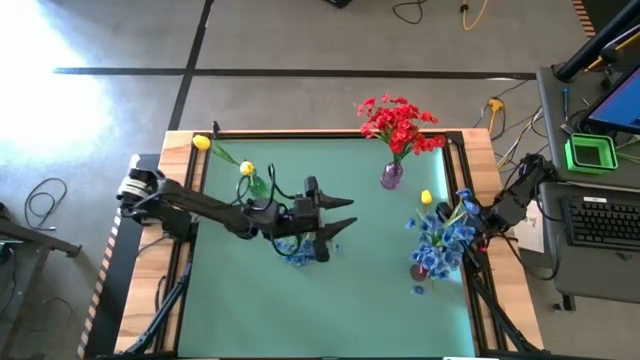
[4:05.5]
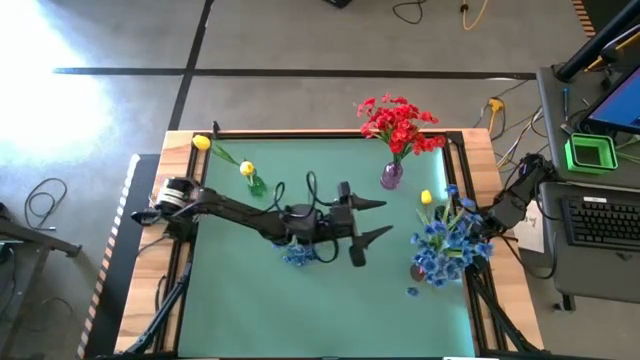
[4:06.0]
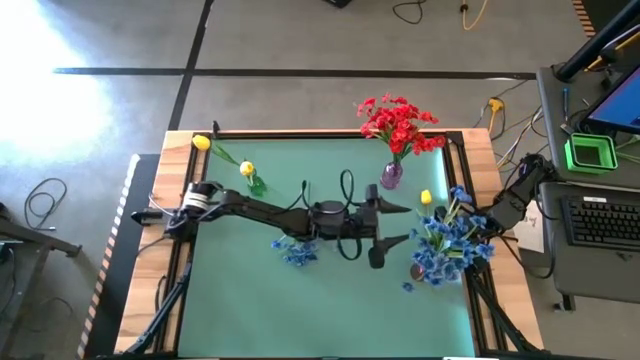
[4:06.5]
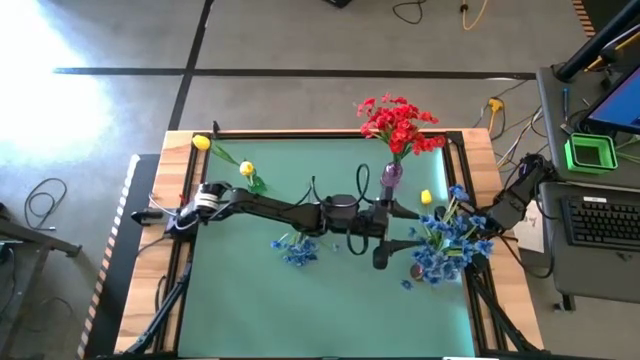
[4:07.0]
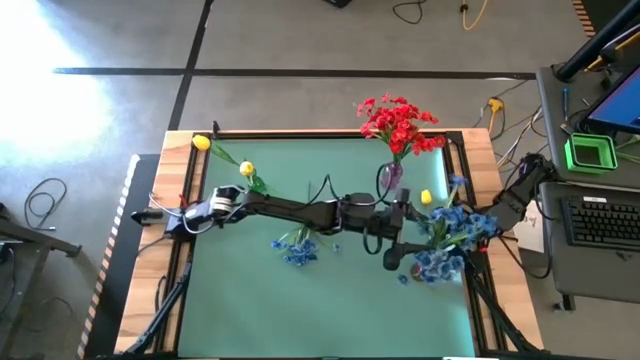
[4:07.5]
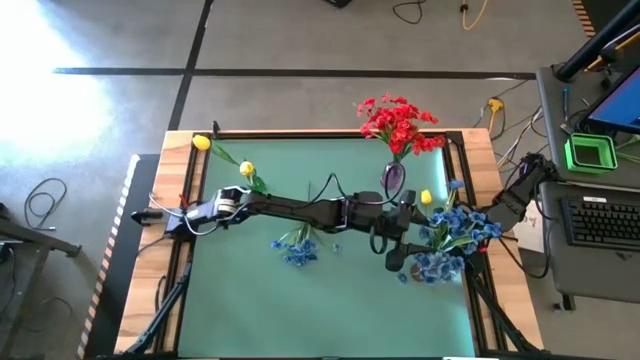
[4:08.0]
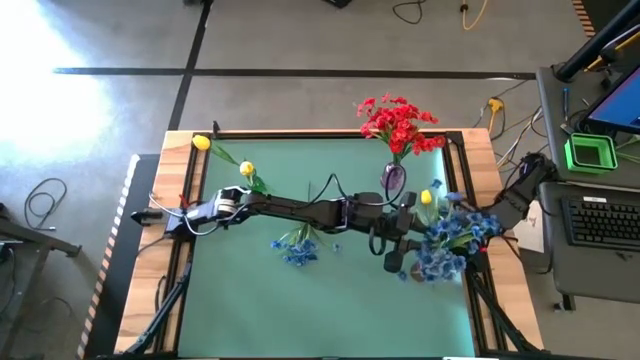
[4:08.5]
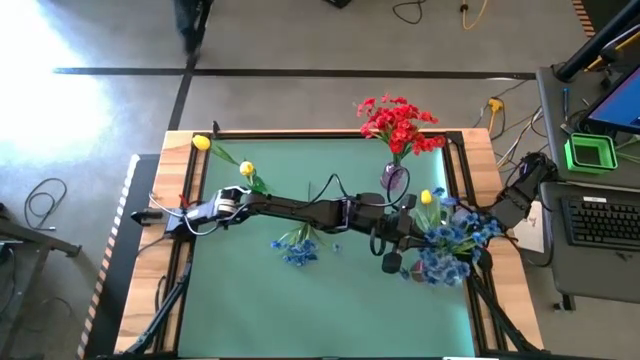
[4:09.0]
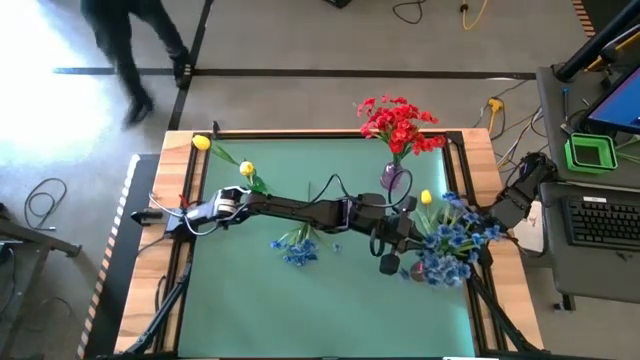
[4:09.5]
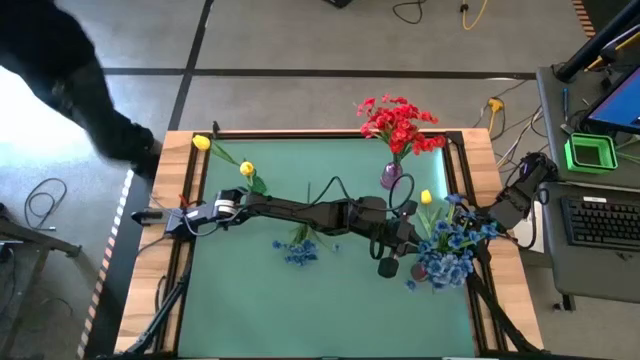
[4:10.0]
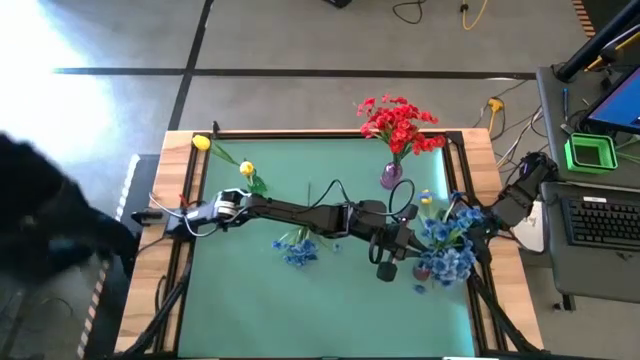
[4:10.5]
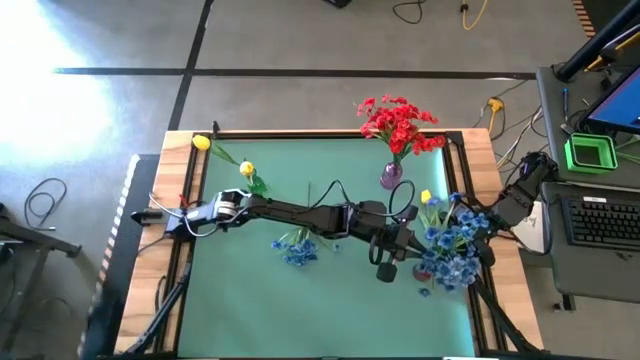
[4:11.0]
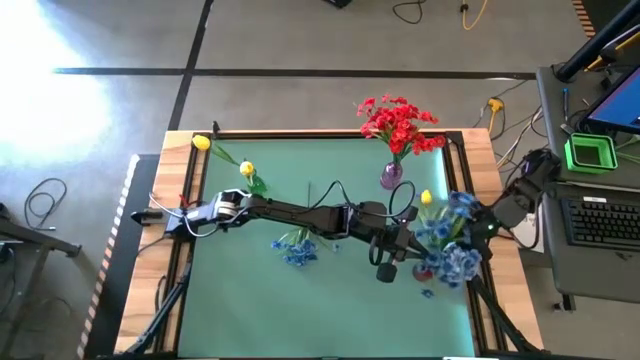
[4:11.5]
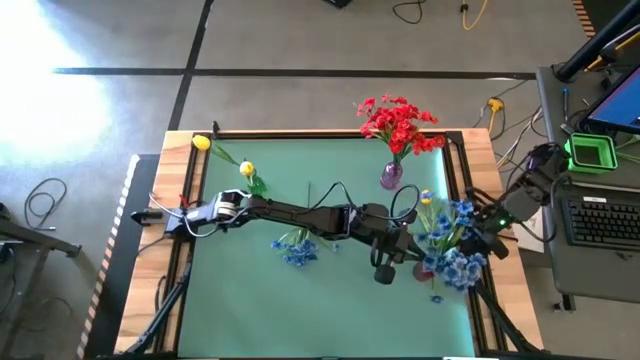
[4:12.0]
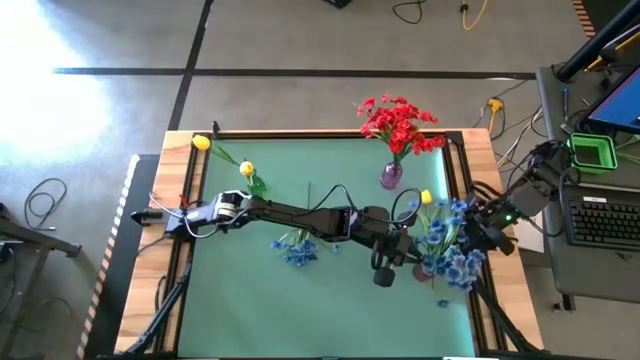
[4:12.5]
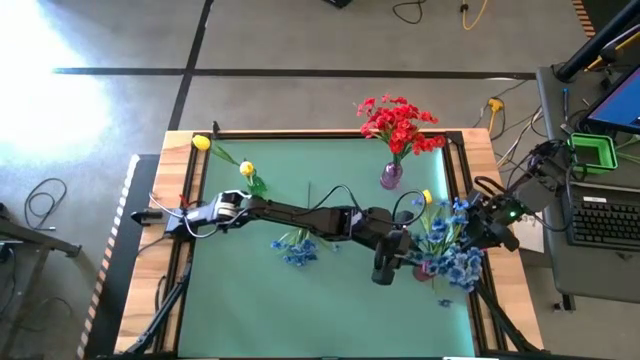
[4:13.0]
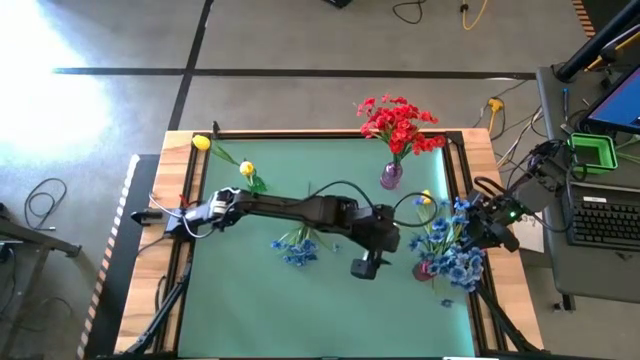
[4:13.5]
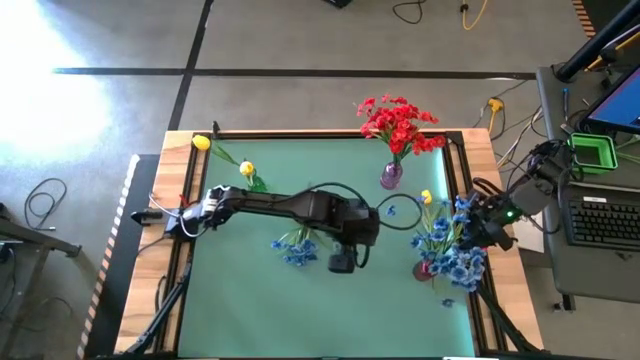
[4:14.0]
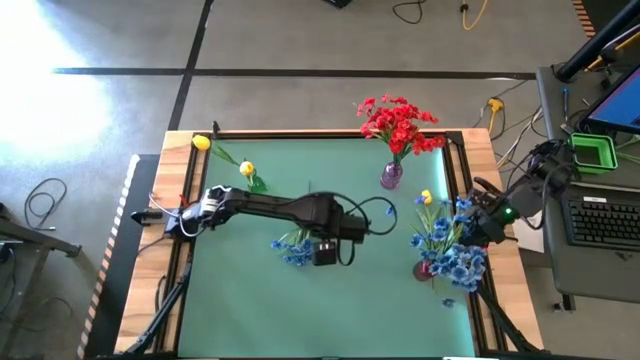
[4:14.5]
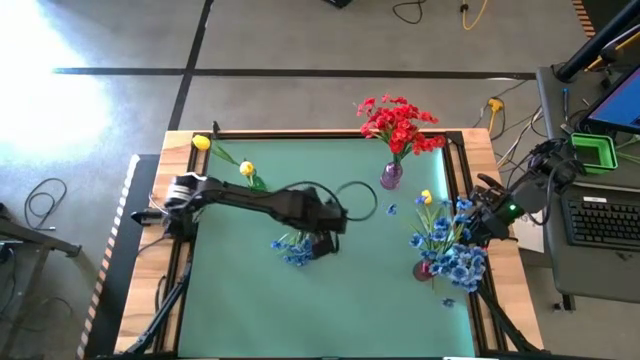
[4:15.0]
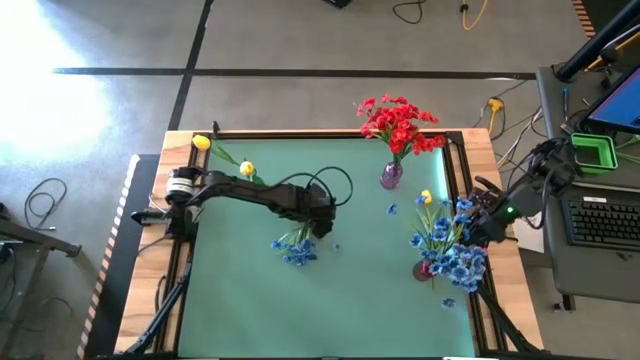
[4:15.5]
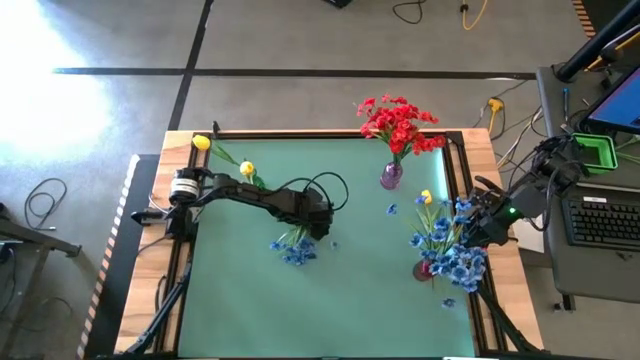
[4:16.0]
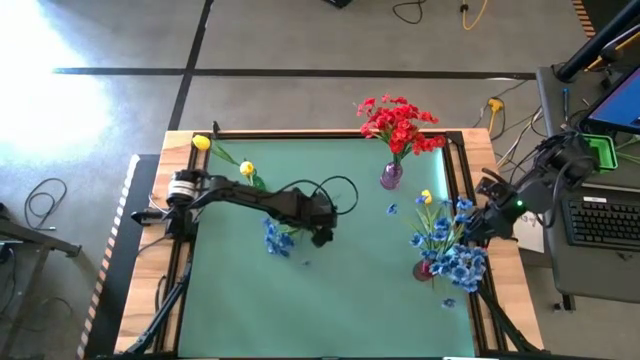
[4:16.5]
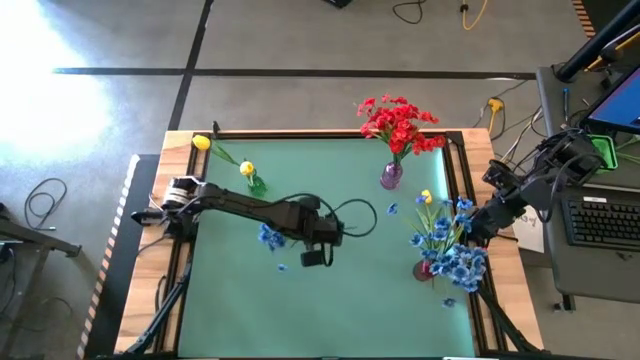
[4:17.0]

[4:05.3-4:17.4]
Task: Sort flowers into vase by color
Put the right blue flower into the red vase

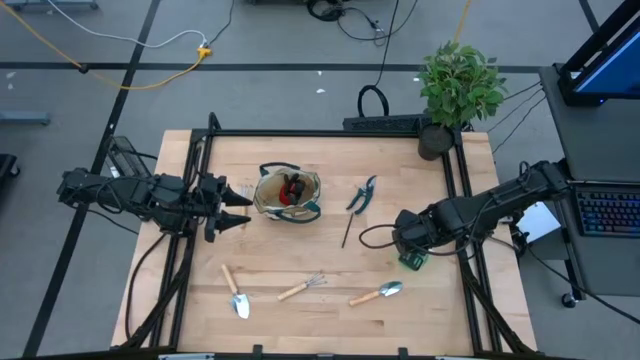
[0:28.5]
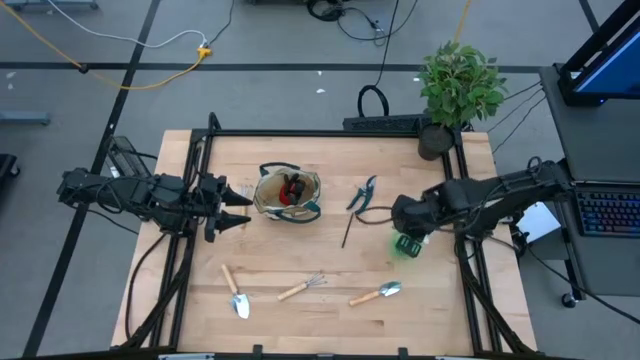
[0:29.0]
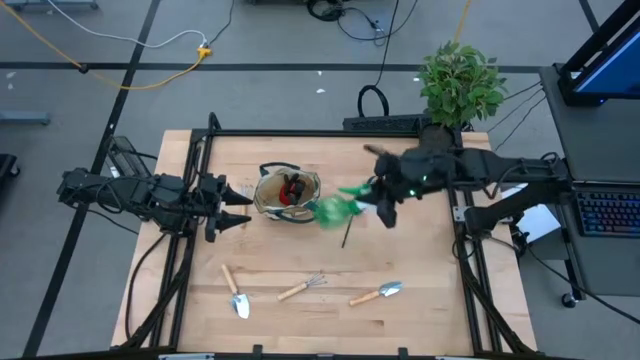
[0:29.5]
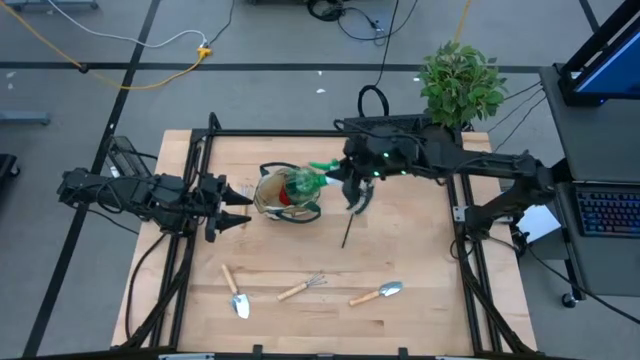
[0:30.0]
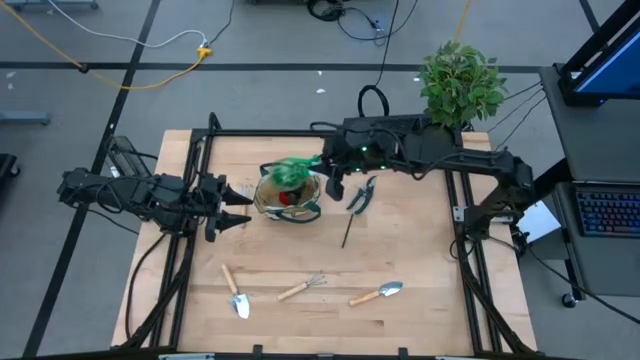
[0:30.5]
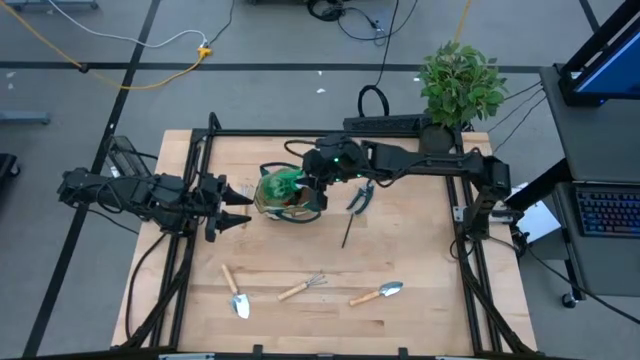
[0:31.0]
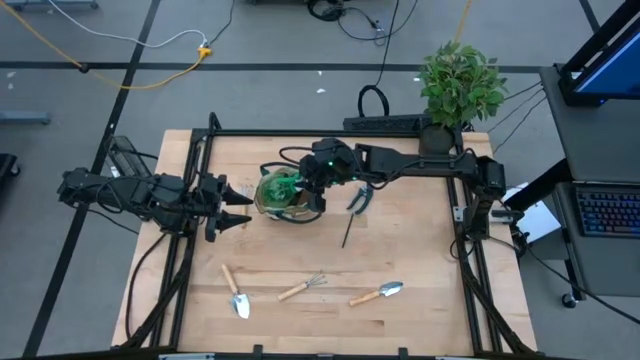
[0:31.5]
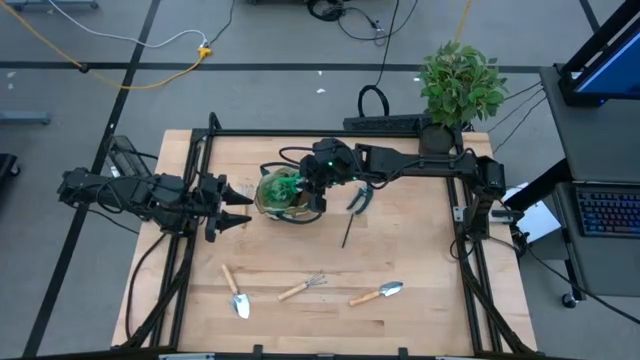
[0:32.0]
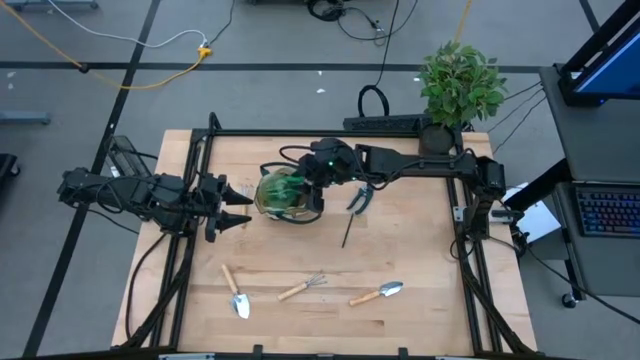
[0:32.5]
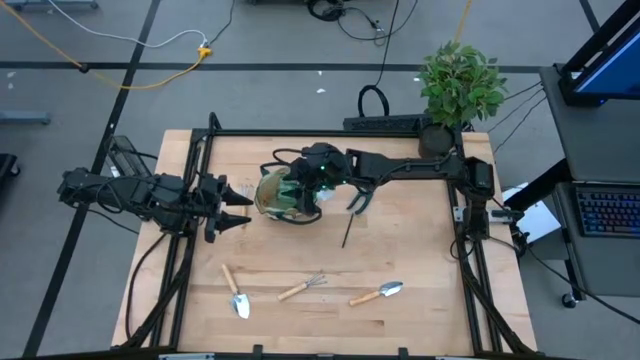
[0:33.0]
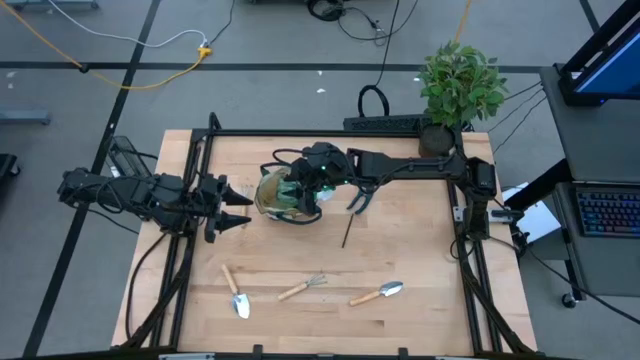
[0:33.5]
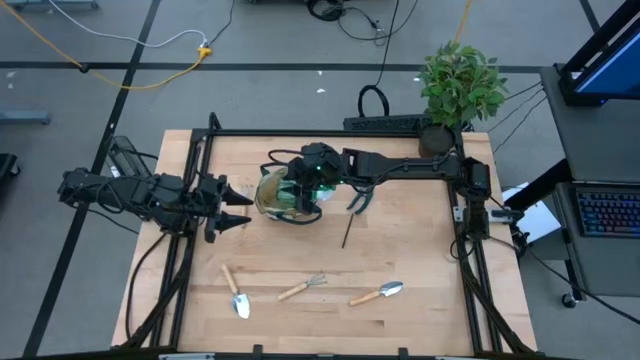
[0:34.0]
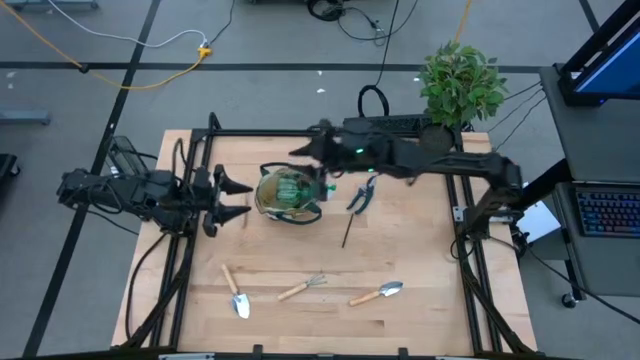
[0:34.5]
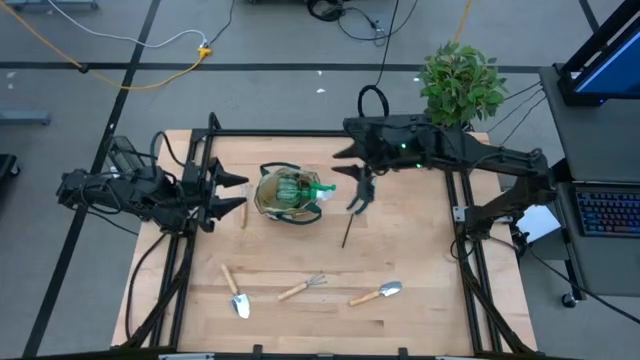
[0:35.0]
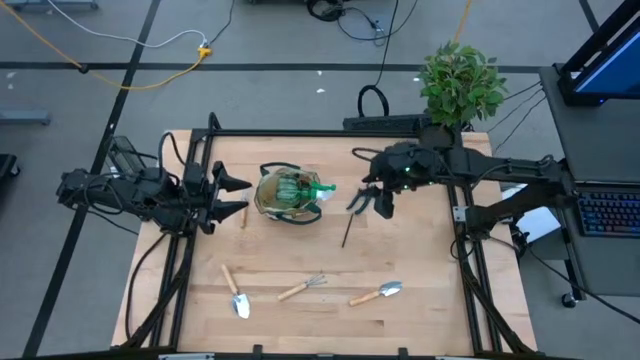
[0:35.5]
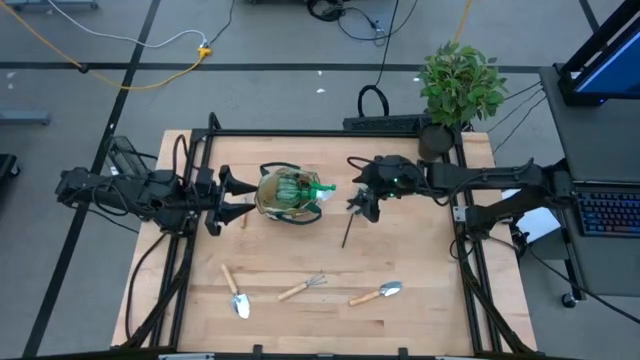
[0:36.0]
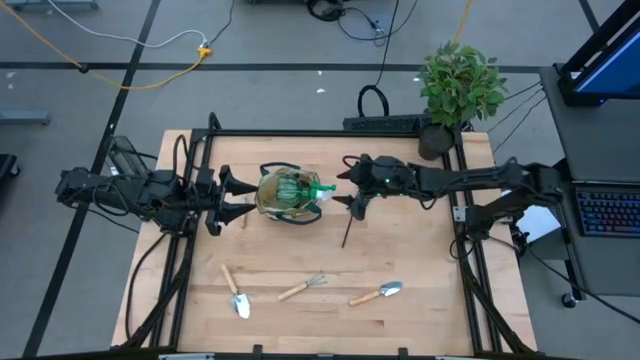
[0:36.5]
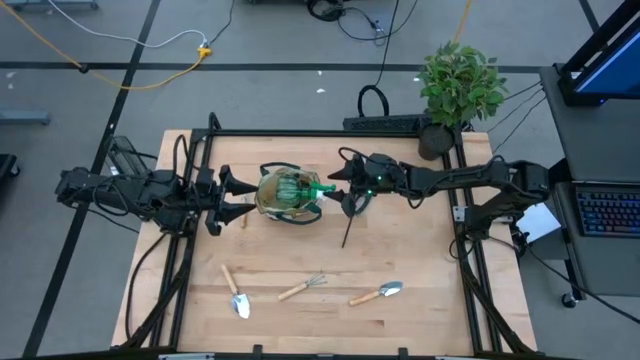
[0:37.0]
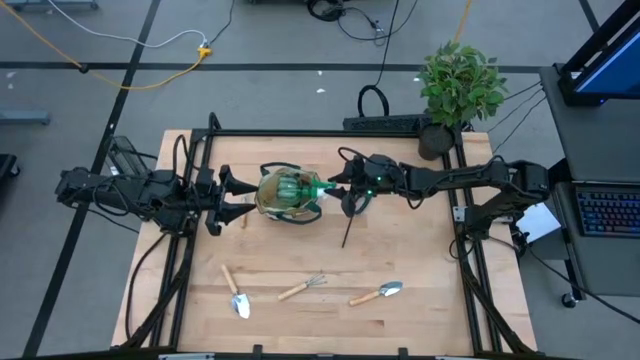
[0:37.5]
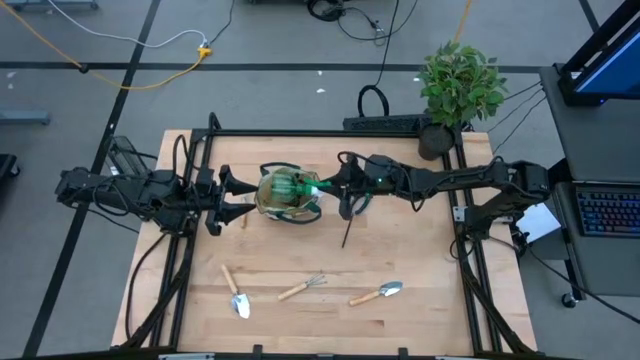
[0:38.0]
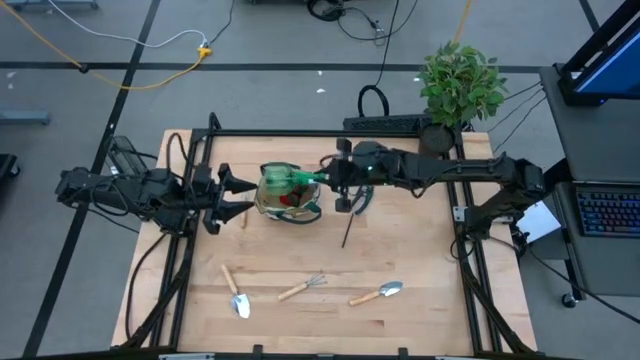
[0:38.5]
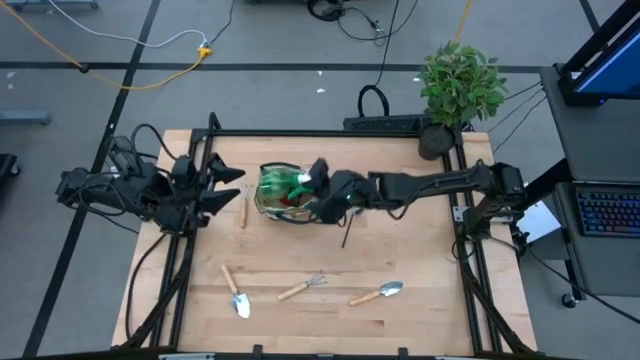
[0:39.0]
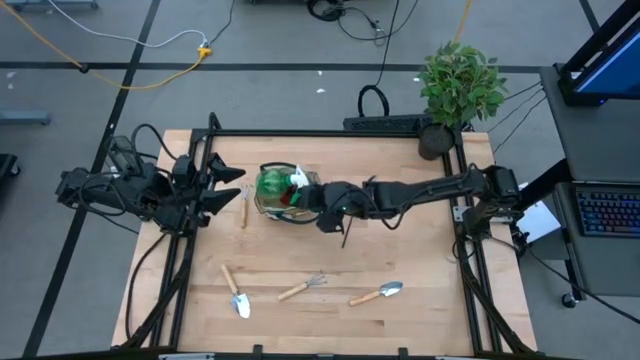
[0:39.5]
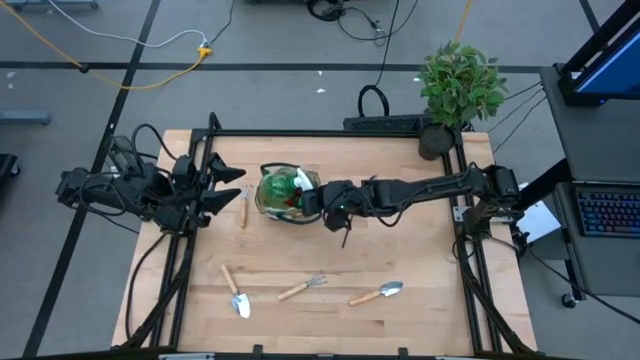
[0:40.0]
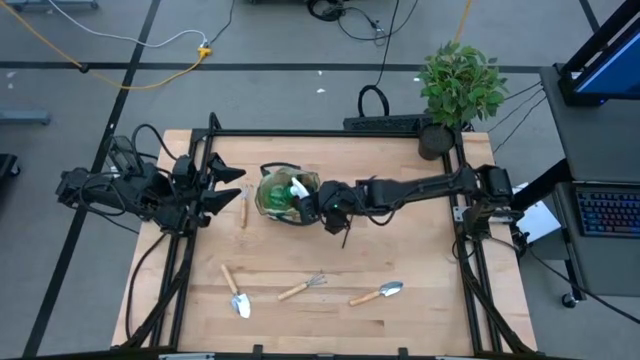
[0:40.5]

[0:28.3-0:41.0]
Task: Pick & Place Garden tools in Gardening bag
Put the green spray bottle into the gardening bag
